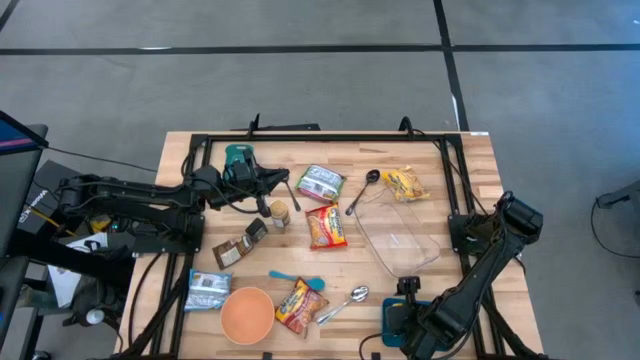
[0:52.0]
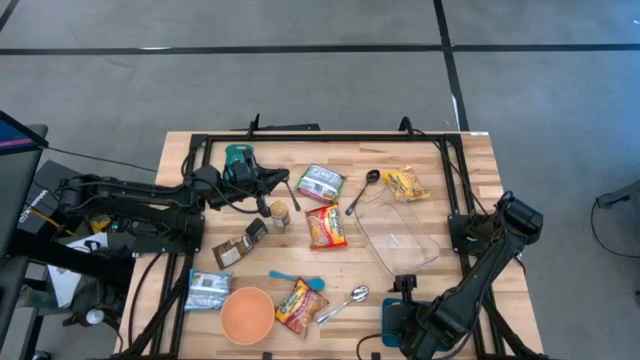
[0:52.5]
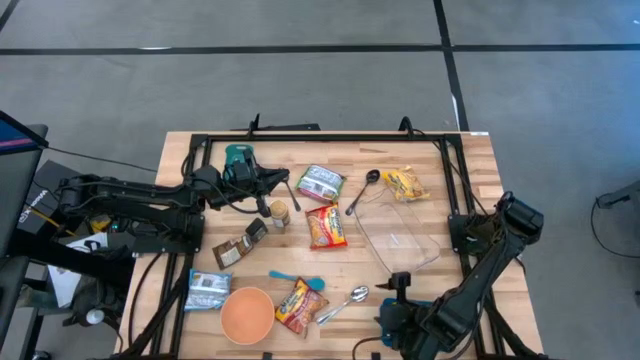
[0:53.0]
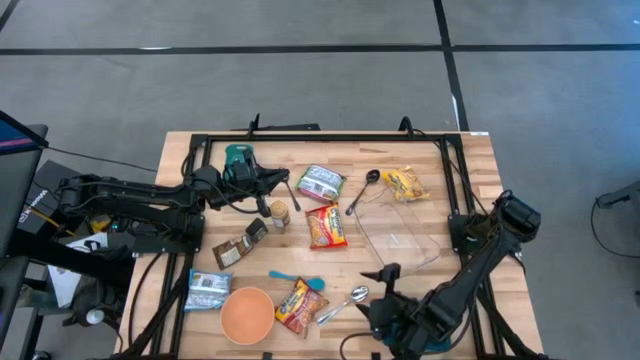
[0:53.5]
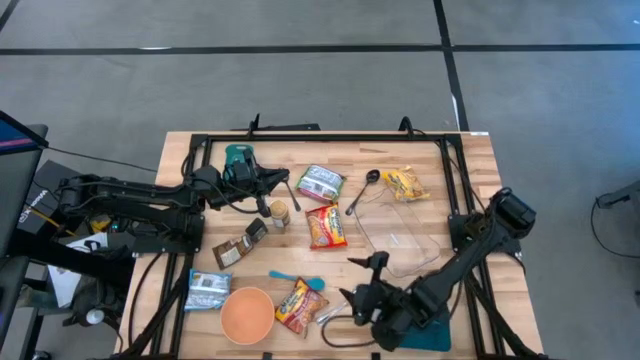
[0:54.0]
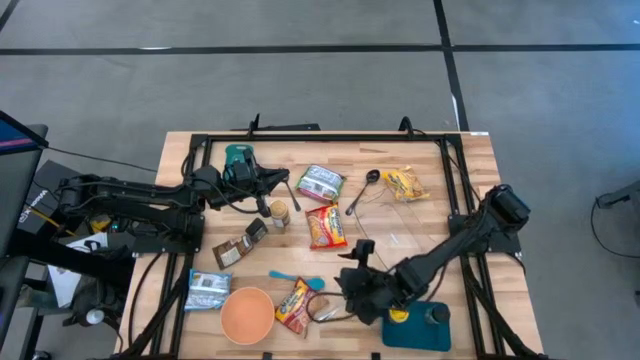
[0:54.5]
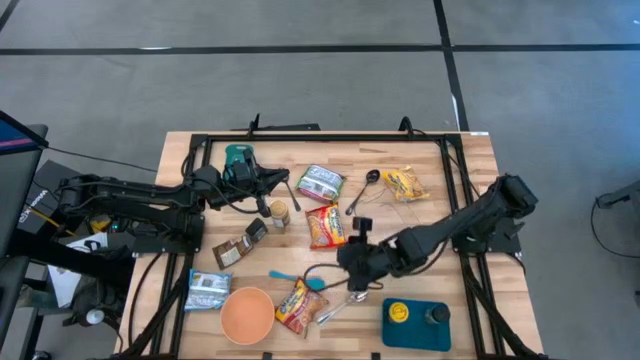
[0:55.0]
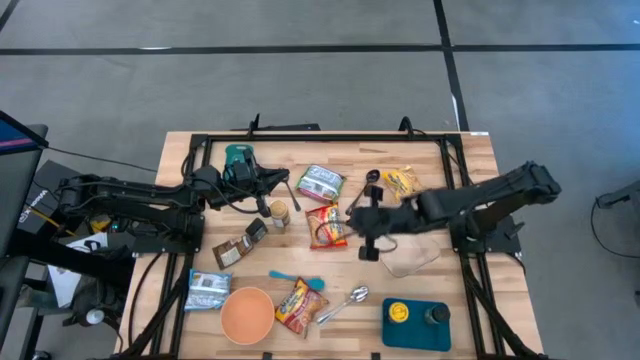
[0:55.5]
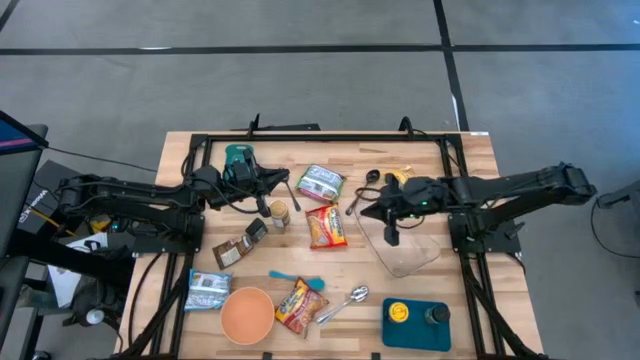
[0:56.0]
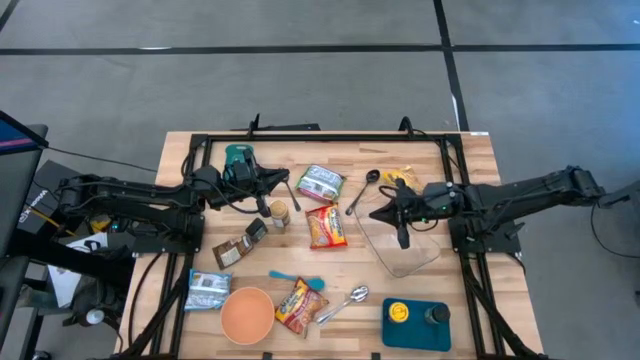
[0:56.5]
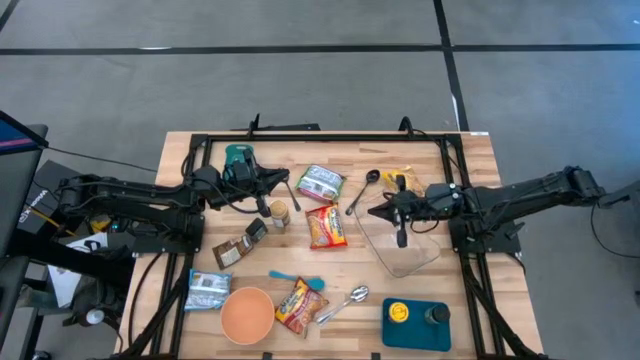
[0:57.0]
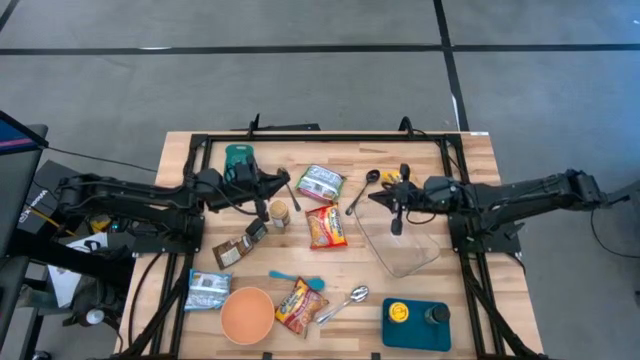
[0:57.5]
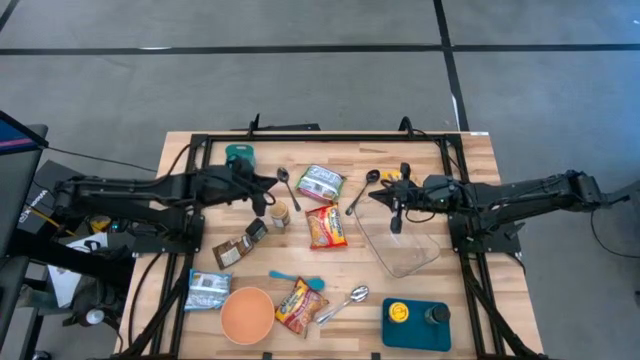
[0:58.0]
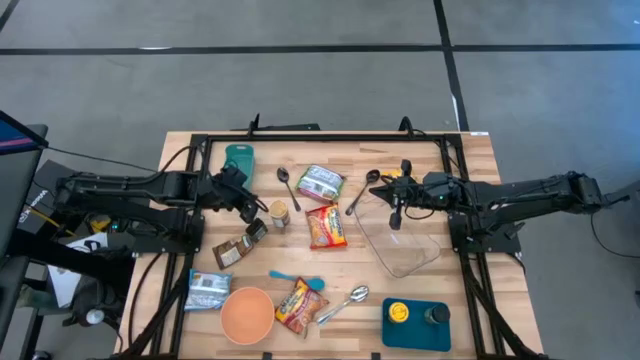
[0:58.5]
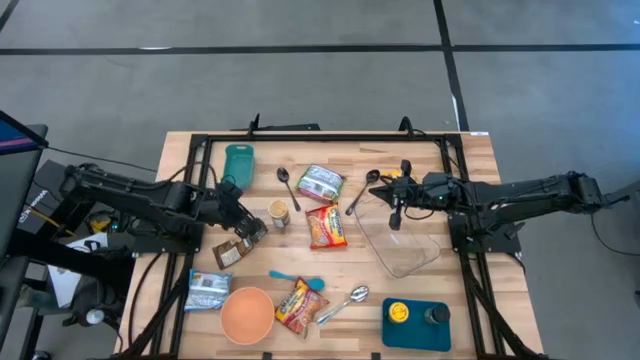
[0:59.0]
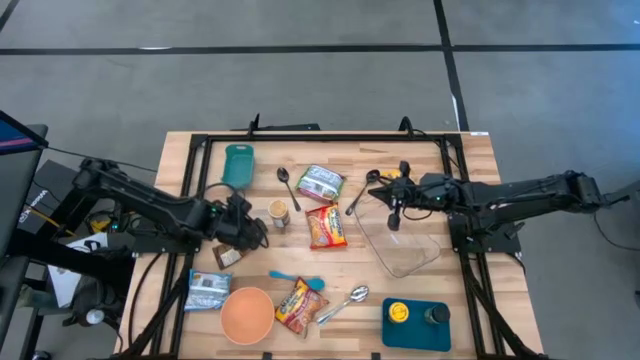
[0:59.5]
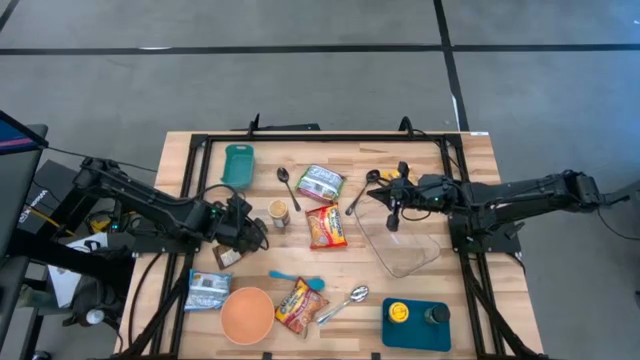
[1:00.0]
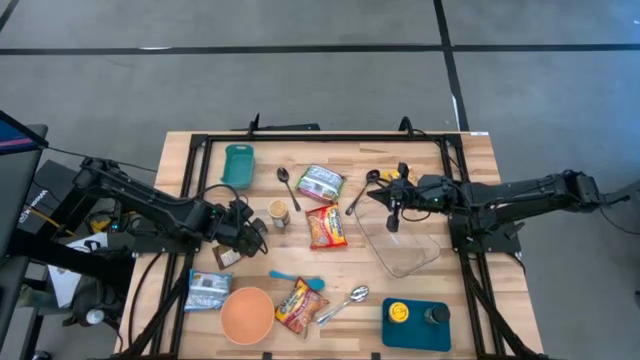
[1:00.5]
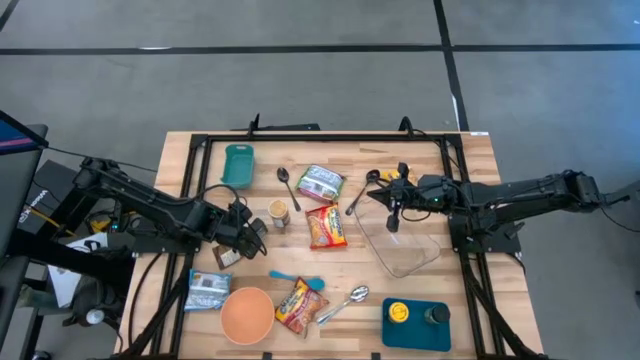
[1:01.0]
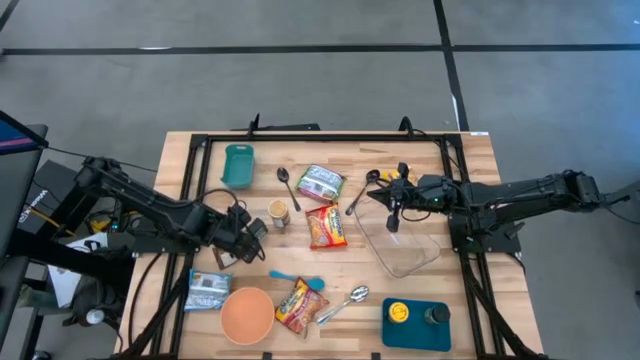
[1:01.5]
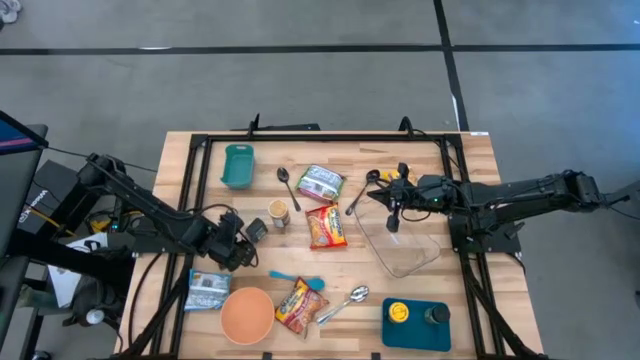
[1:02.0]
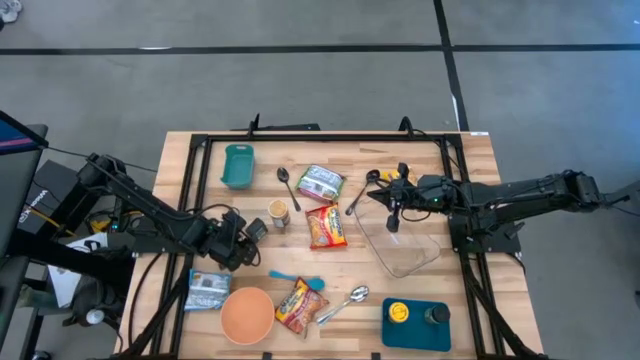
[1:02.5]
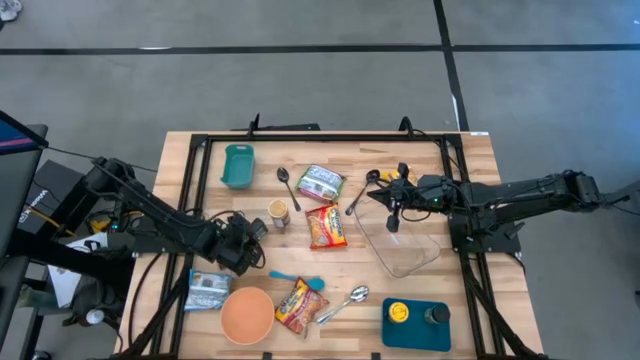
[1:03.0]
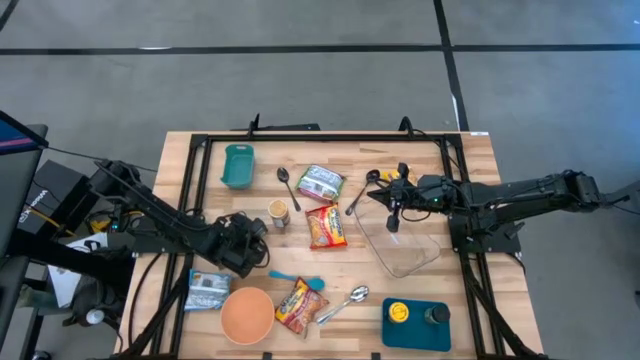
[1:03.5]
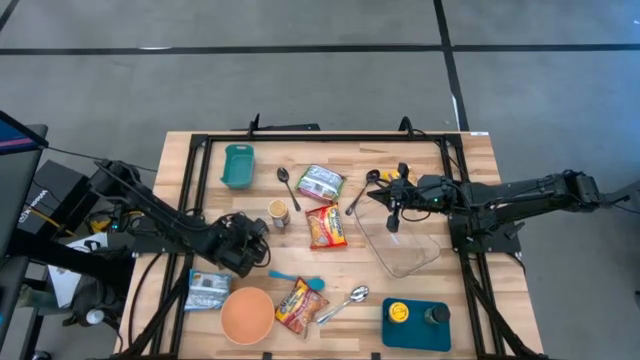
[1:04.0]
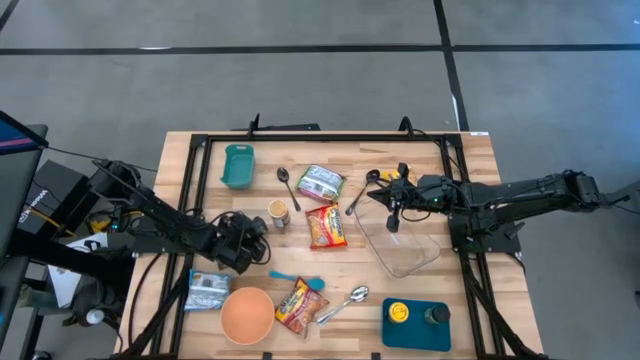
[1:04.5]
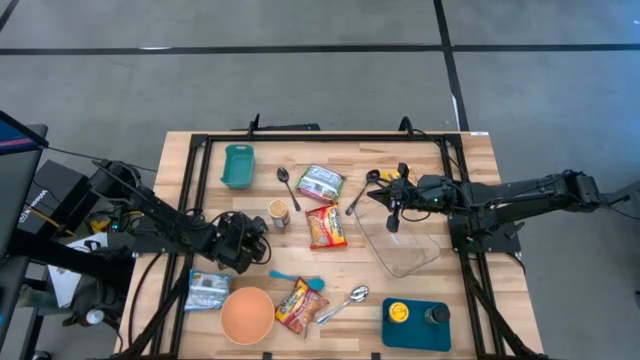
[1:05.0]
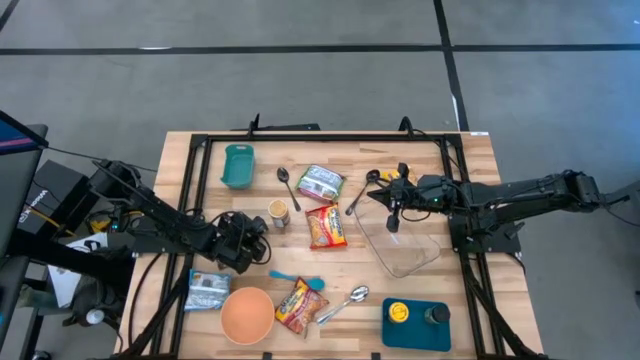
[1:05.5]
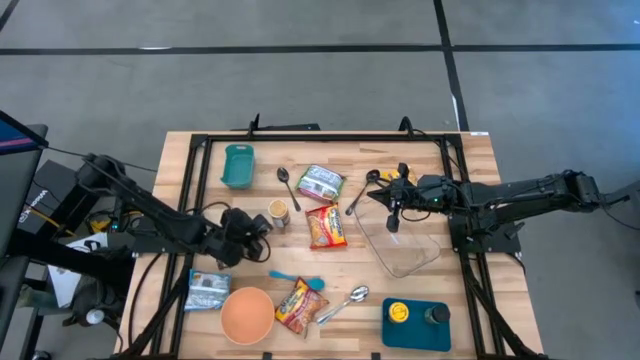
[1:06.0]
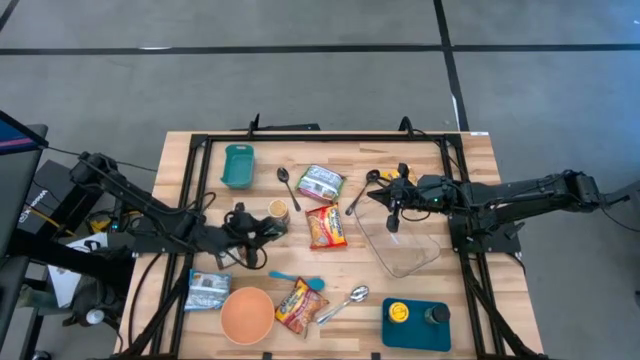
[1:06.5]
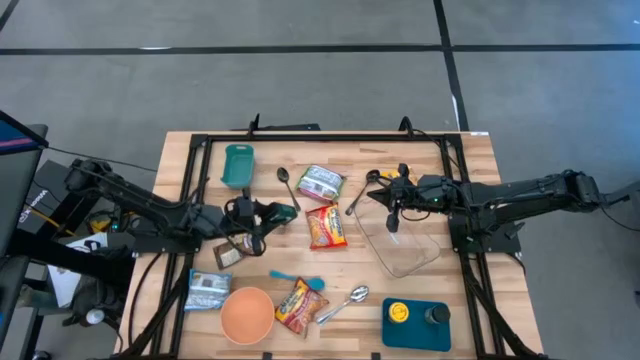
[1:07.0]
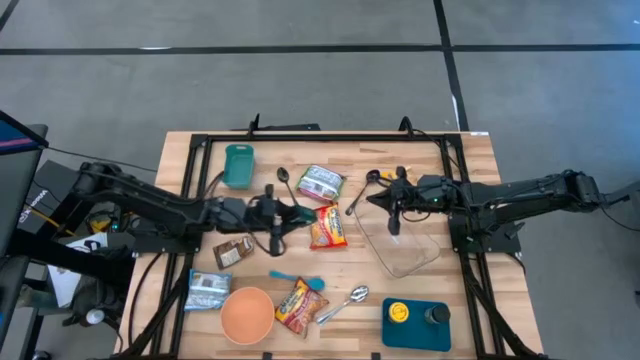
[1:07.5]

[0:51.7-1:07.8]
Task: Pick & Place Food Item
Put the black spice can into the blue bin

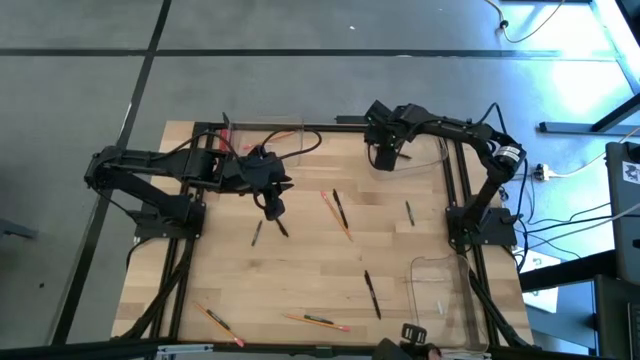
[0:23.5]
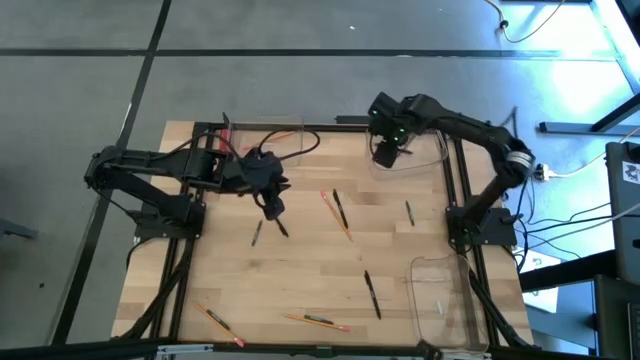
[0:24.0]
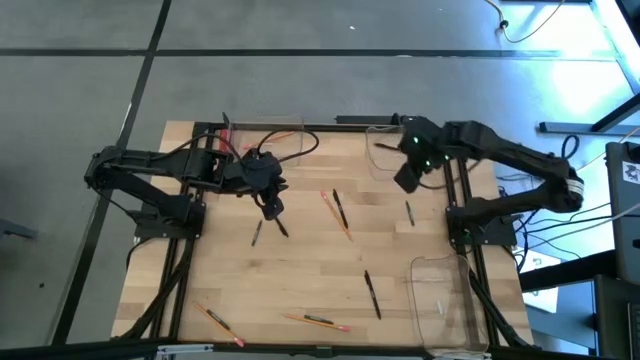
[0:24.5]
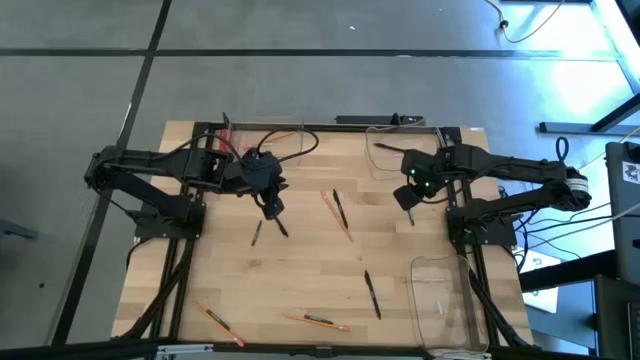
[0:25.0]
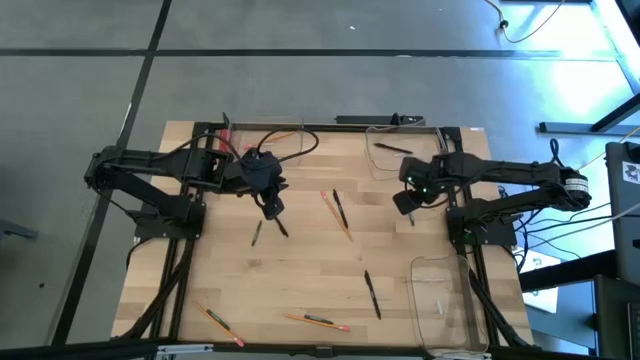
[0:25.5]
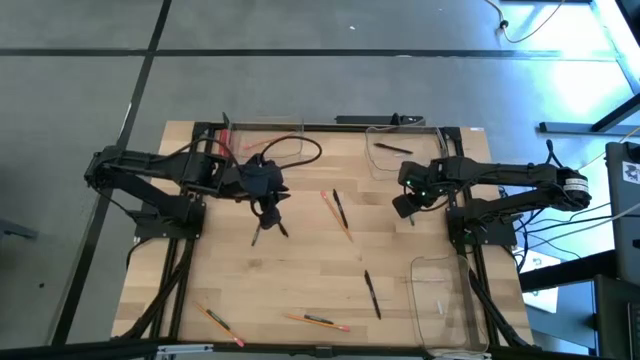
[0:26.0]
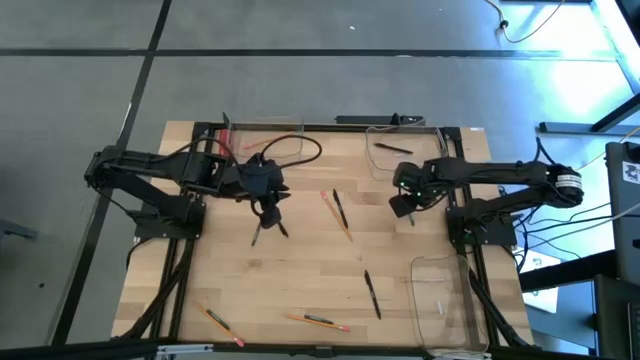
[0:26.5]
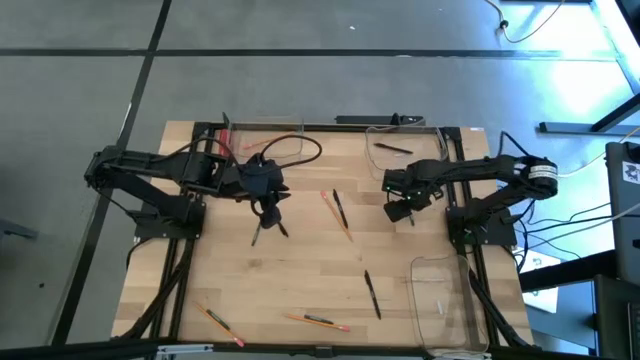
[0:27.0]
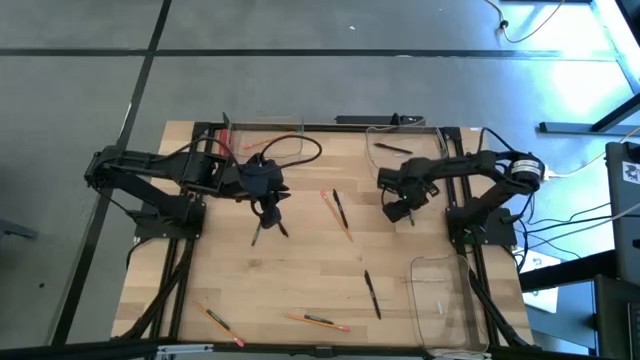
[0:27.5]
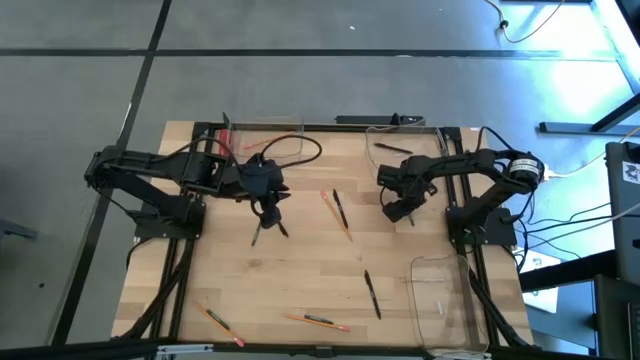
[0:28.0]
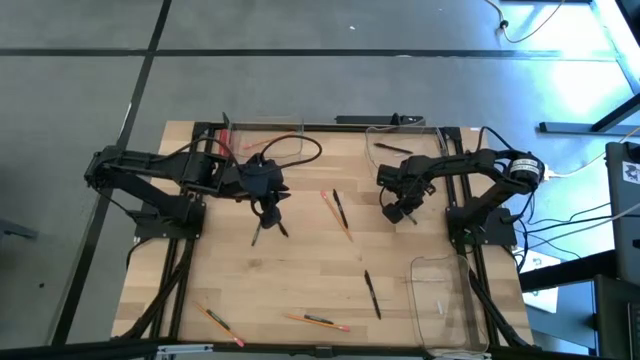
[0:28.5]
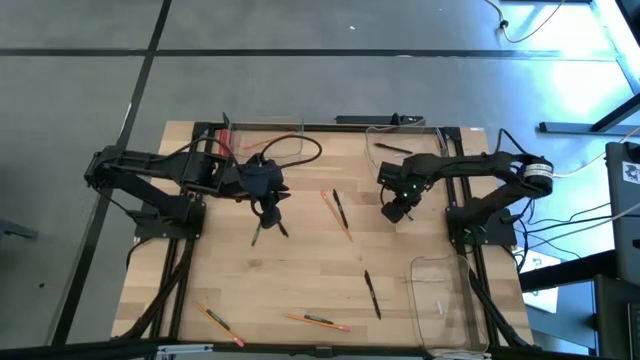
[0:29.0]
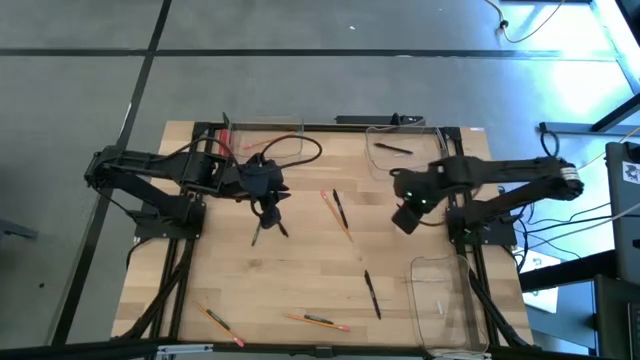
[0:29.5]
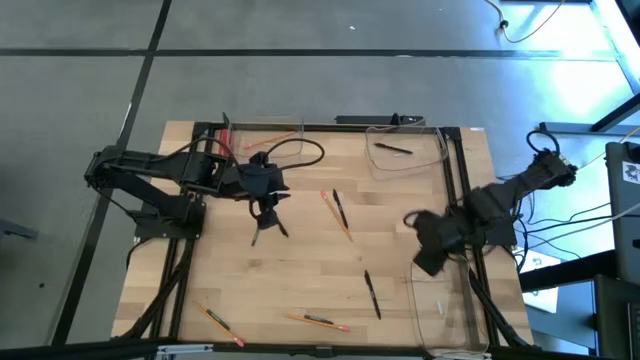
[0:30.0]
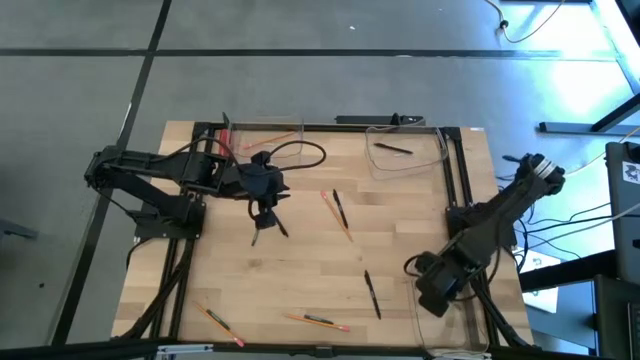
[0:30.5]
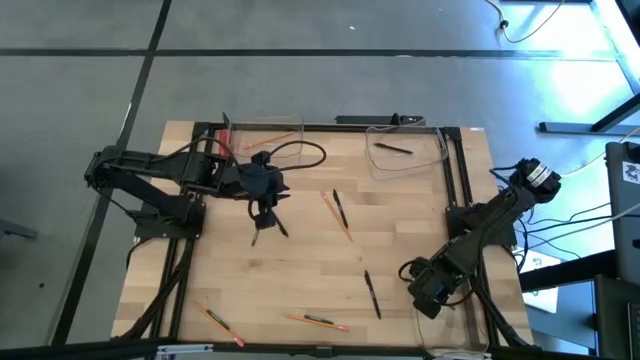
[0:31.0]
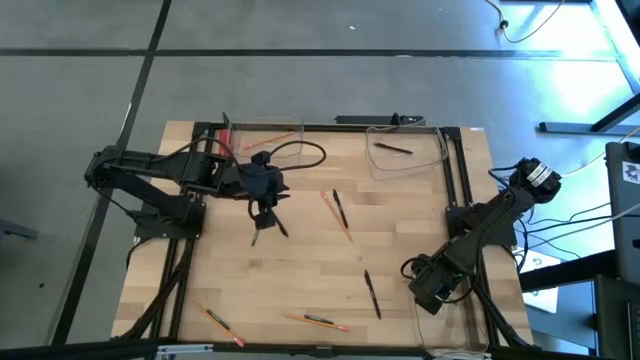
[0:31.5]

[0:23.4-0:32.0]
Task: Sort crayons/erasers/pens/pencils in bins
Put the top right green crayon into the bottom transparent bin
